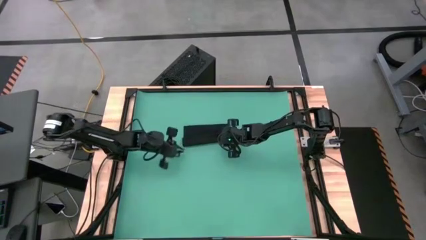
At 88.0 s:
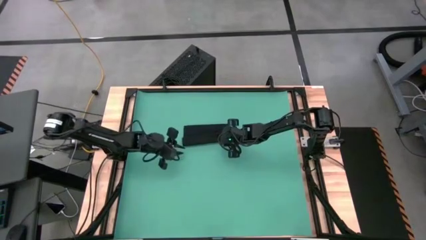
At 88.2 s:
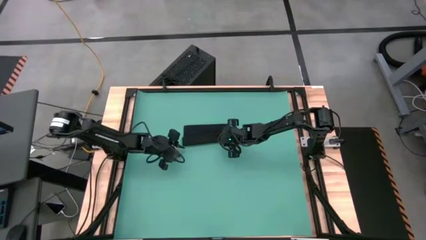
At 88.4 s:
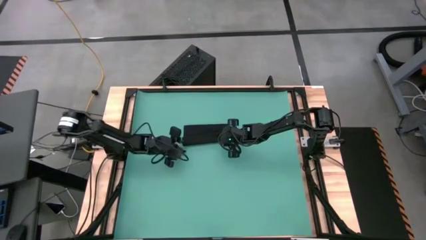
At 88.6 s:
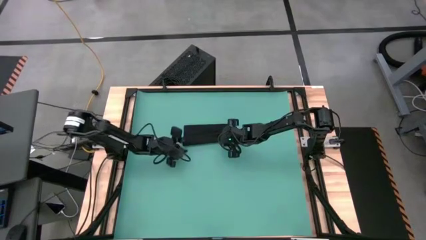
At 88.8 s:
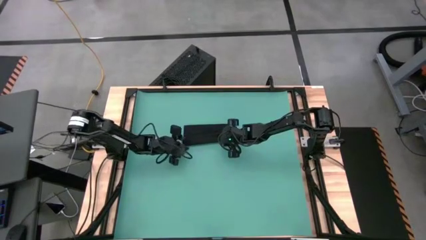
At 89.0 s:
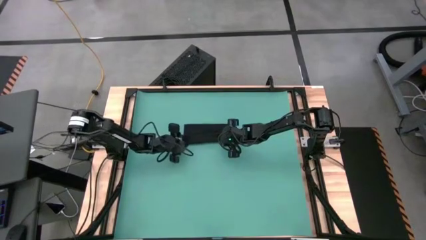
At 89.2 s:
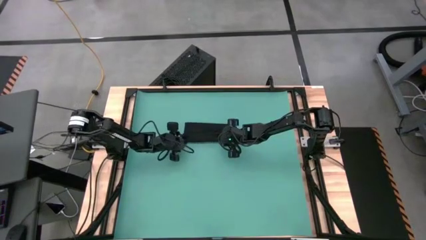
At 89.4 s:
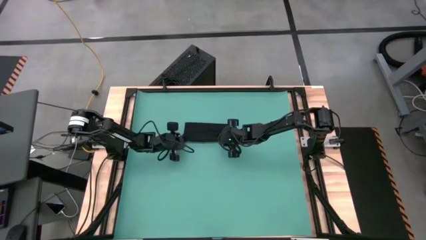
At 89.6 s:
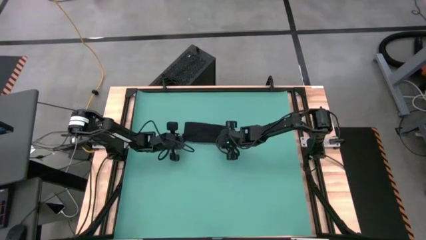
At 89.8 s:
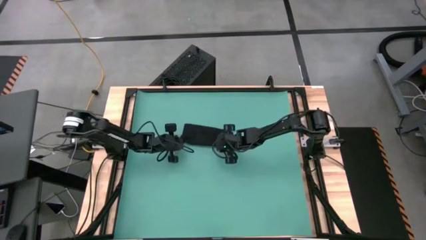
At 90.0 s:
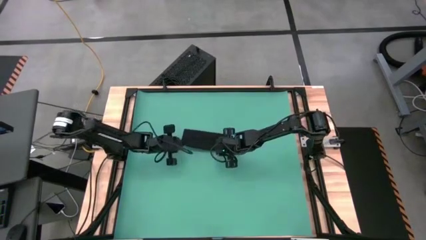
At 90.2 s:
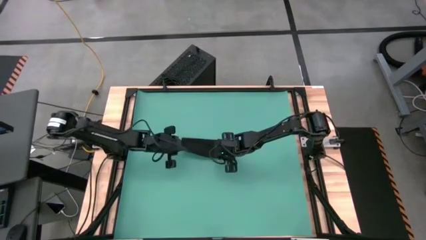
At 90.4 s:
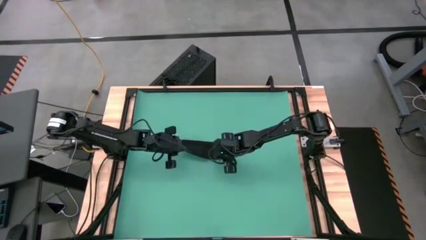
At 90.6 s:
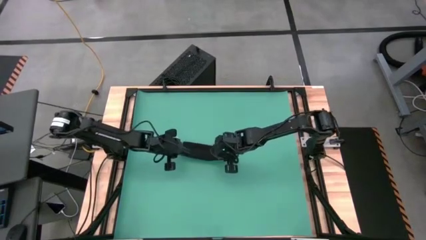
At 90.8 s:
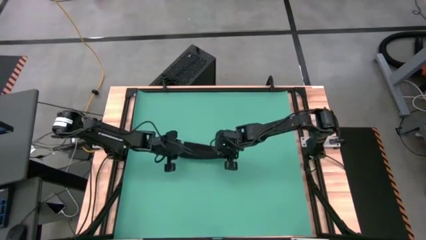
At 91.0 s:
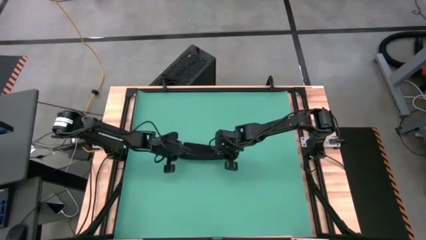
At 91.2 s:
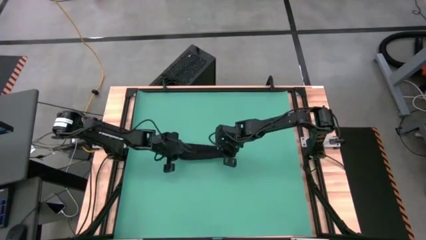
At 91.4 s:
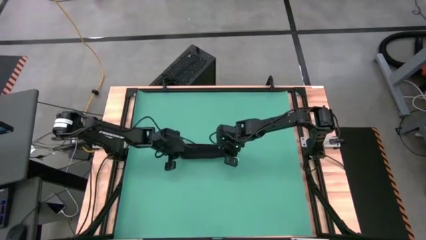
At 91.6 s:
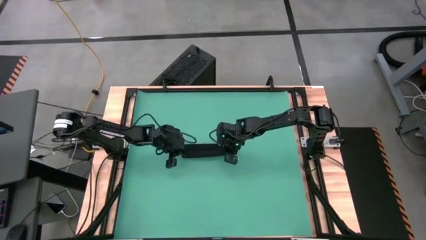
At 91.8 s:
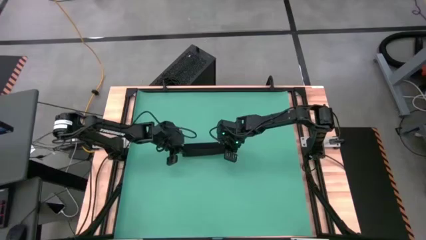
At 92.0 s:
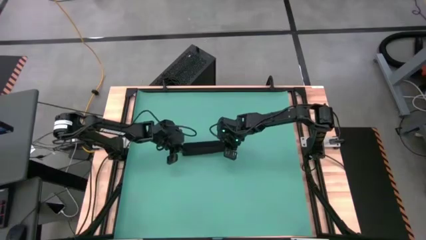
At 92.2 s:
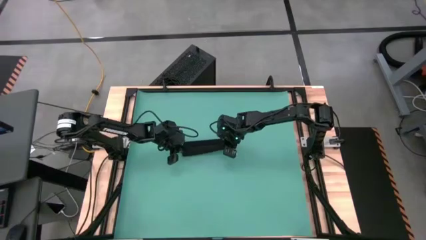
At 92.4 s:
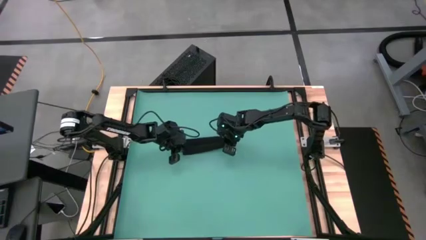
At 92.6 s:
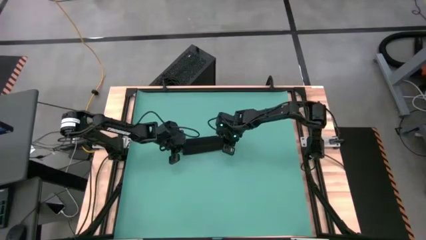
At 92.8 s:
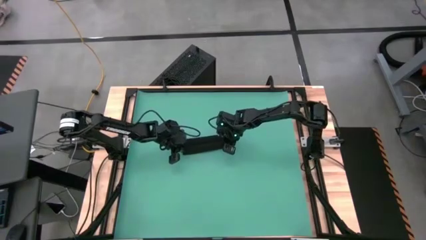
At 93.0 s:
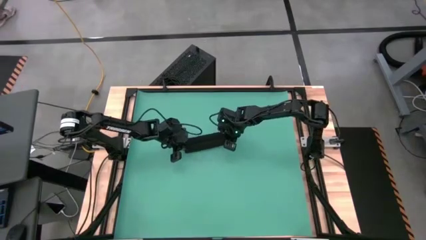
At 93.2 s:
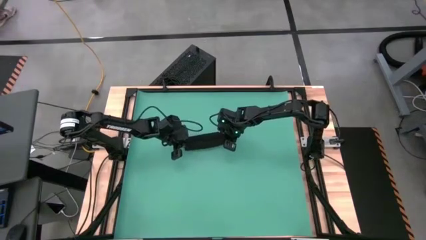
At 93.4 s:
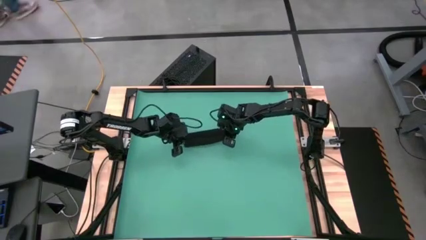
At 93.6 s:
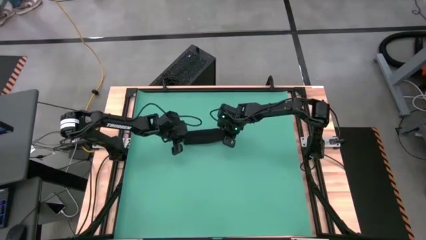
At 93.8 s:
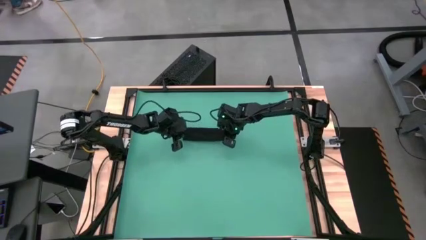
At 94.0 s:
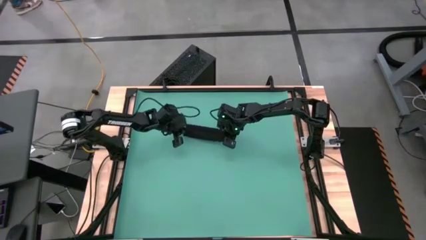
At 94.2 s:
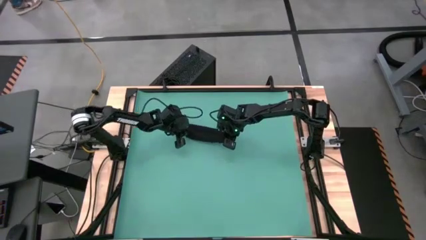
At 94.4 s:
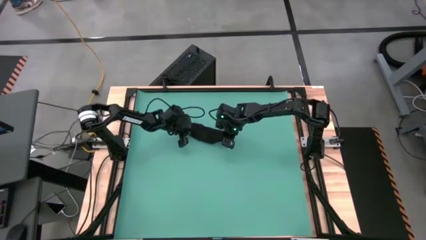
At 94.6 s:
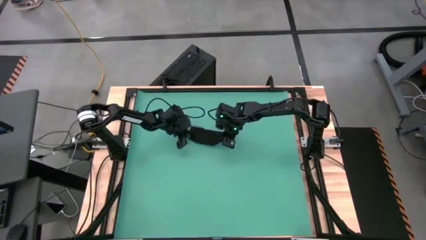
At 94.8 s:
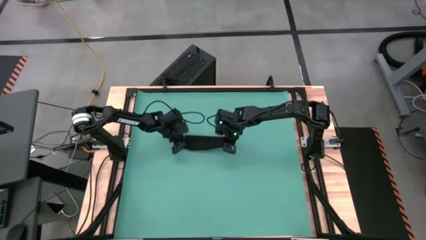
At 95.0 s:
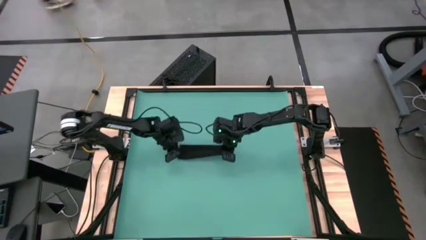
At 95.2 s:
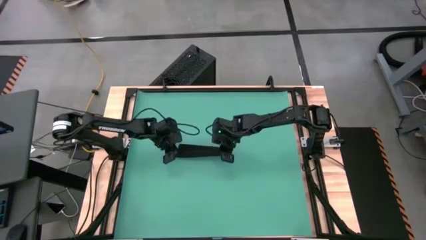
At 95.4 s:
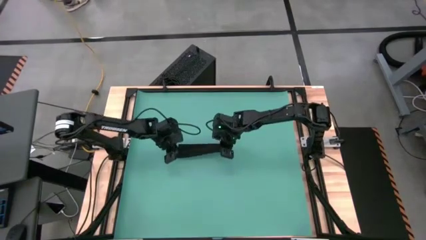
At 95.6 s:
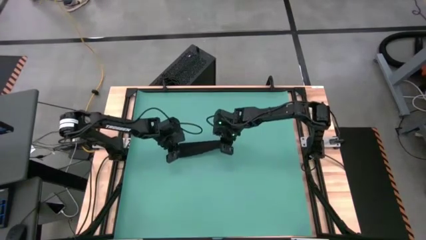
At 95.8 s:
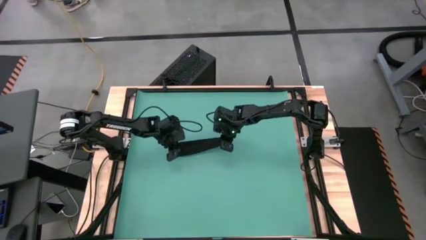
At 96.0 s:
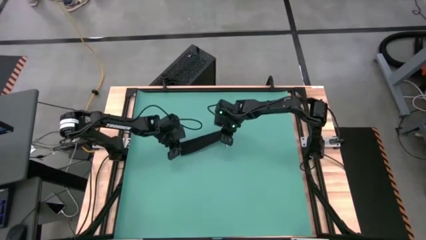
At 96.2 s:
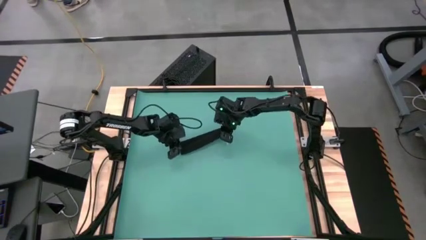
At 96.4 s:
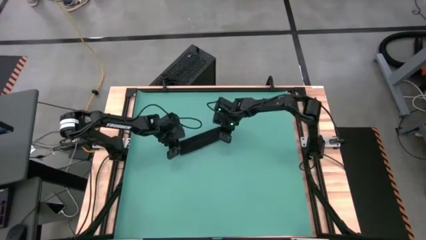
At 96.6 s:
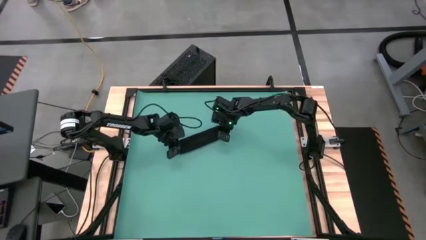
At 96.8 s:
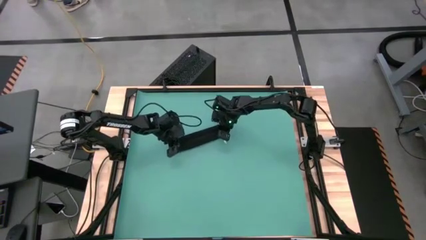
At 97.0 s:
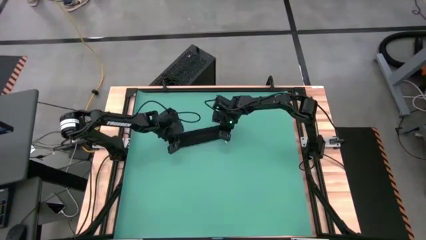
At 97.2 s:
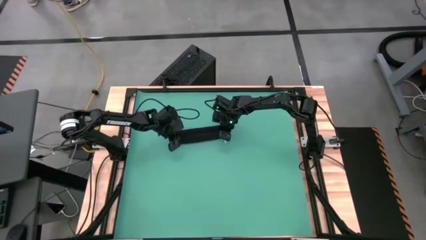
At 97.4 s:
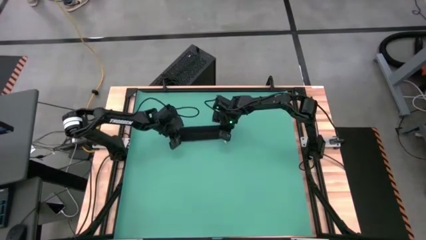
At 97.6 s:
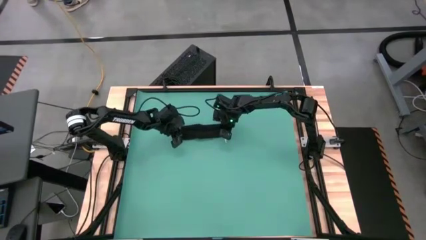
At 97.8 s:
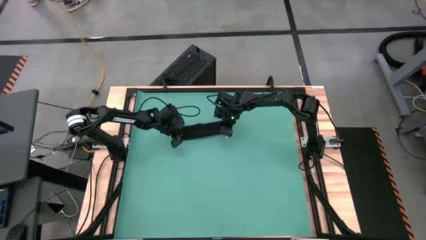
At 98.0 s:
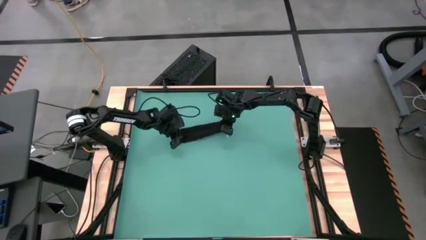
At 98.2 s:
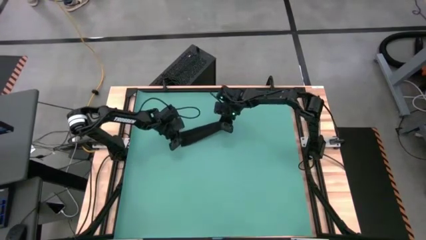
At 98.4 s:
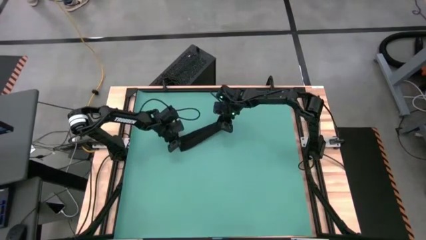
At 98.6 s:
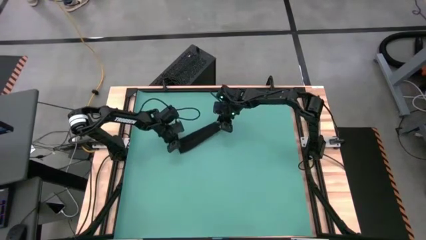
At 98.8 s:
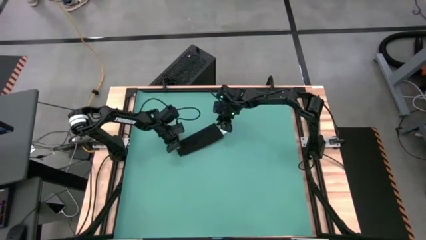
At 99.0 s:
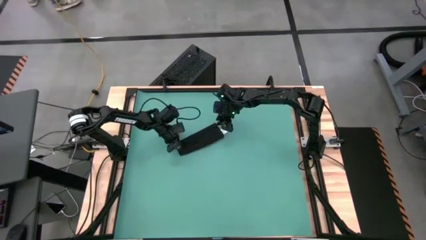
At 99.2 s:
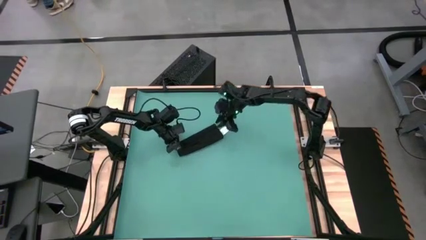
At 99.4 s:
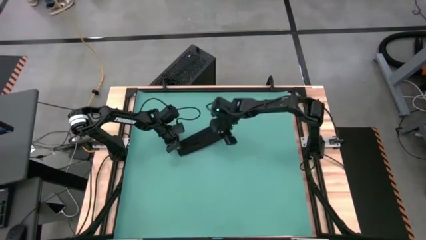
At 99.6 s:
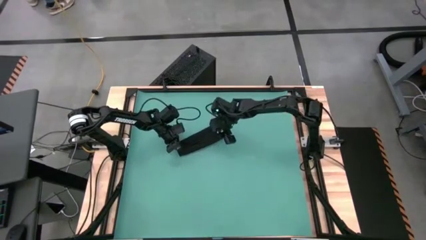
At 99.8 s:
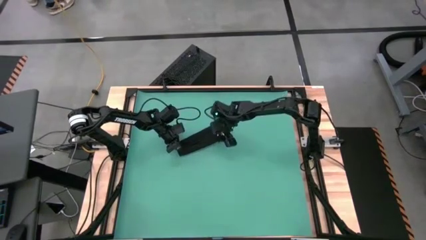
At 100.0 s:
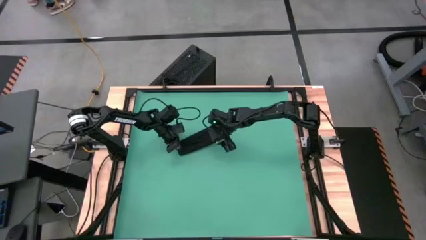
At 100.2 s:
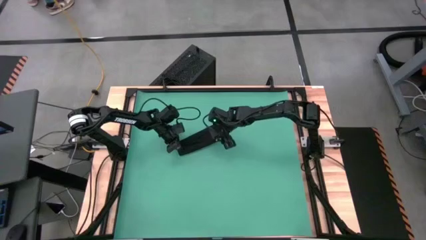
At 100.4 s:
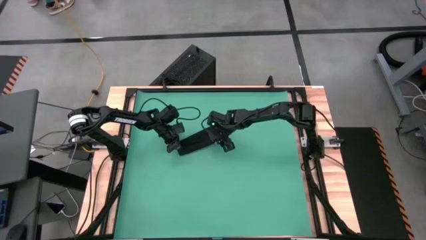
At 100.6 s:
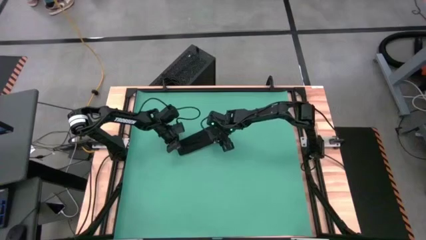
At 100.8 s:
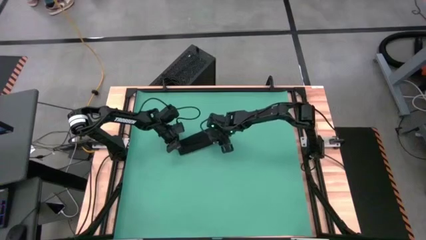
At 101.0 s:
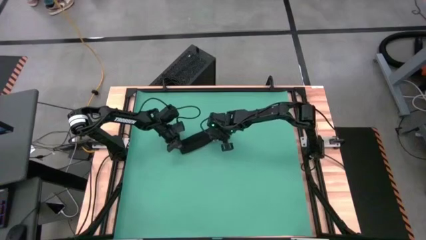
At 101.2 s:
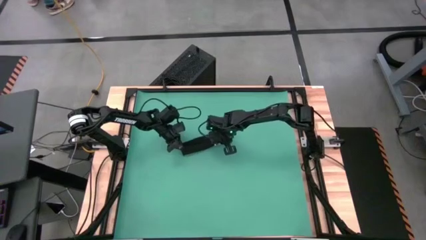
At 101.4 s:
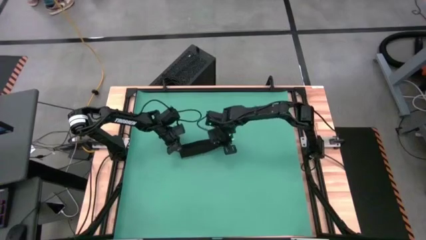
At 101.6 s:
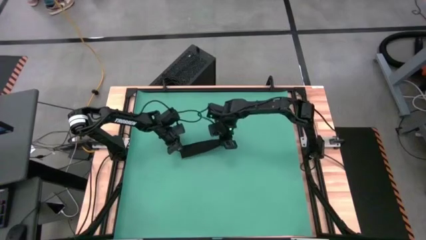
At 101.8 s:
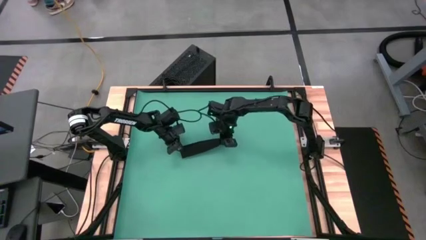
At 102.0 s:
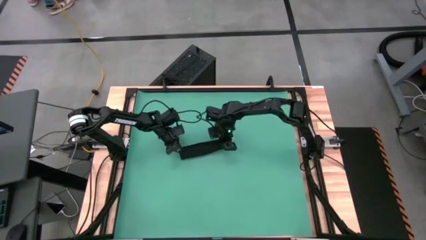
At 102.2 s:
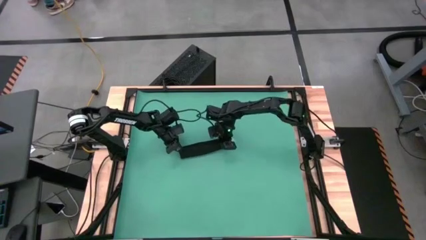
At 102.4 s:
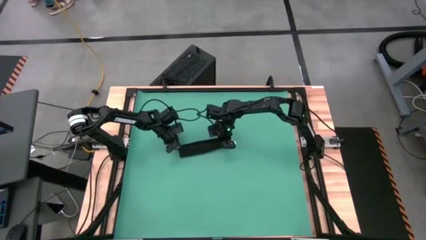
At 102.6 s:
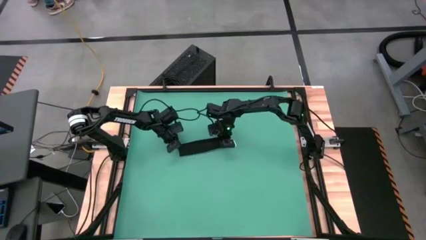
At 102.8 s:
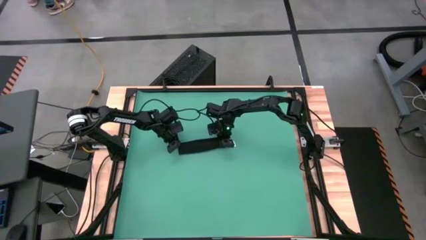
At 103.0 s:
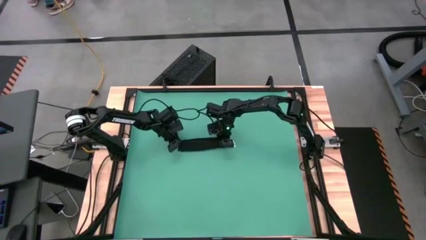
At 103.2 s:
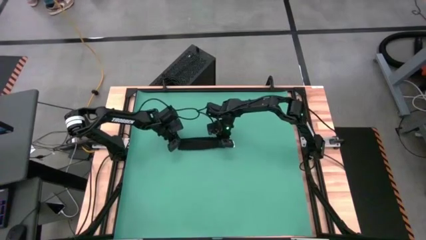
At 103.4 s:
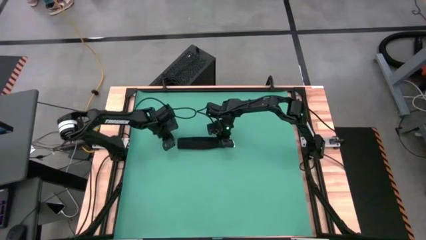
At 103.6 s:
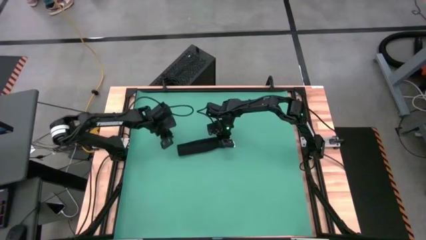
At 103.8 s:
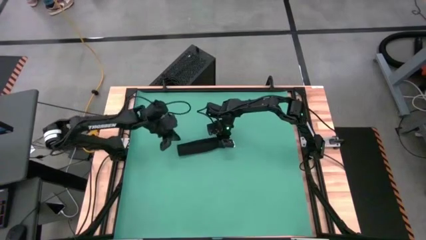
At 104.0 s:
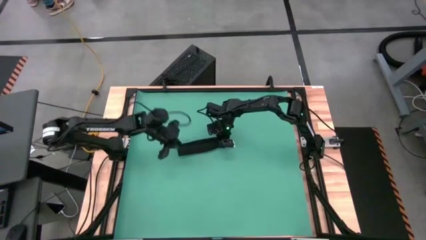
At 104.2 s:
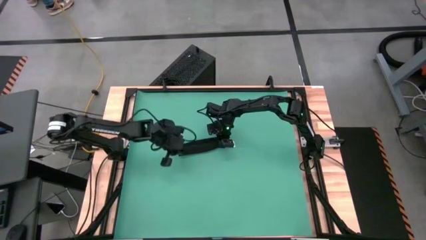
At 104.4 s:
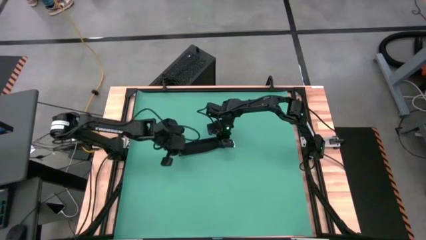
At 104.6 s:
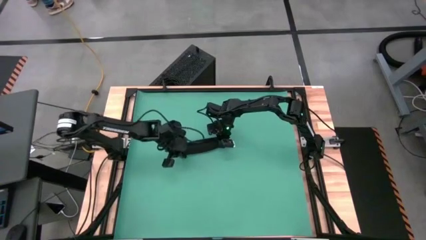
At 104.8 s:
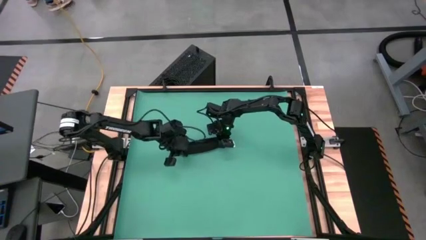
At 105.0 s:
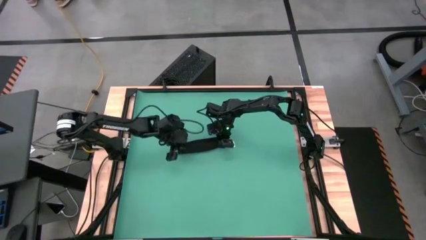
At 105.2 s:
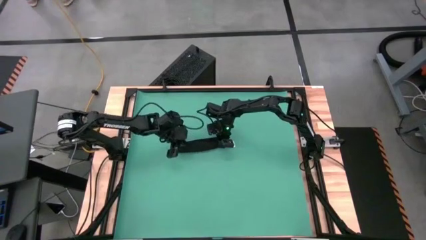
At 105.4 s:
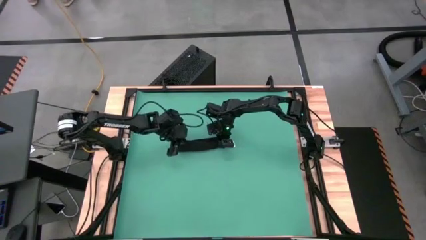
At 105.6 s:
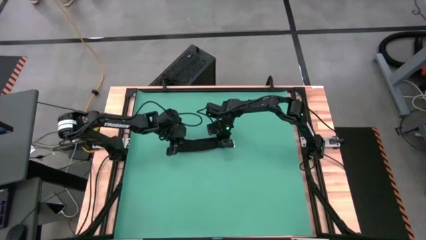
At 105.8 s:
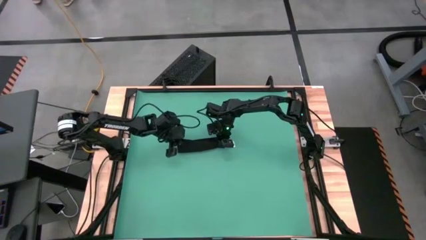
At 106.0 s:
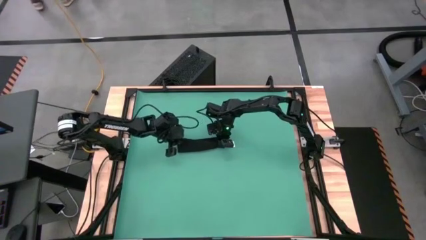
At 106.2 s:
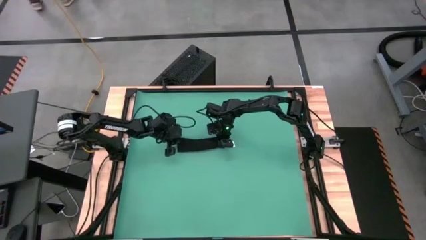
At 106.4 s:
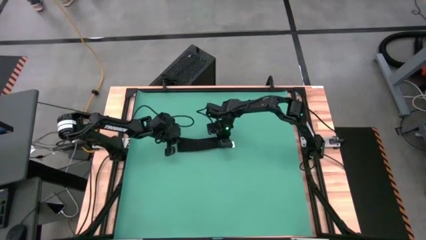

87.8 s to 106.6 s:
Task: Roll napkin
Roll the black table napkin
